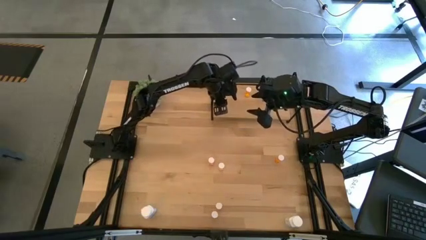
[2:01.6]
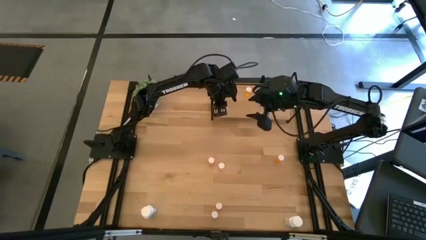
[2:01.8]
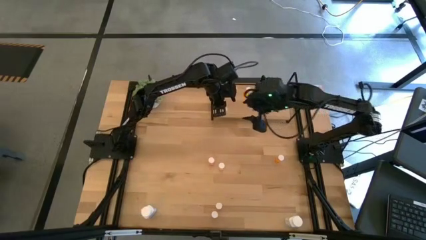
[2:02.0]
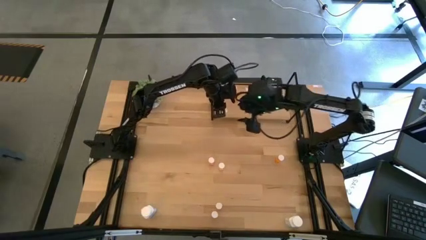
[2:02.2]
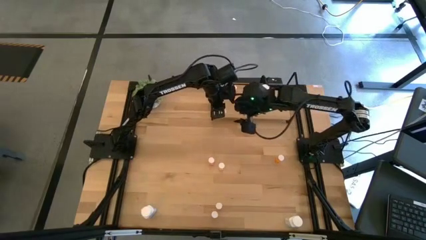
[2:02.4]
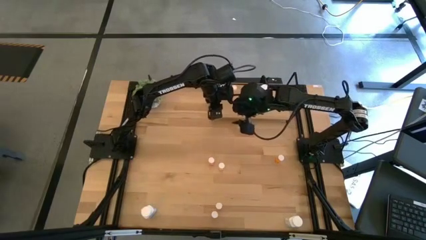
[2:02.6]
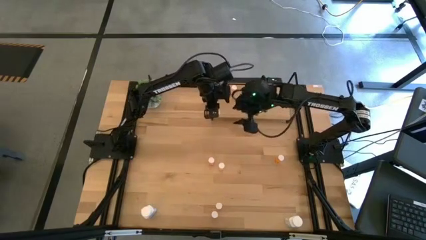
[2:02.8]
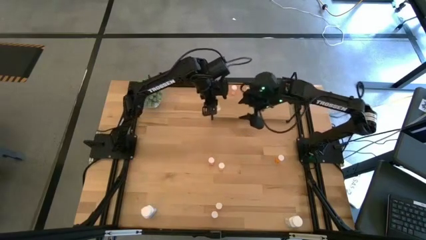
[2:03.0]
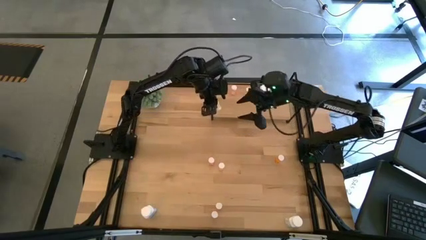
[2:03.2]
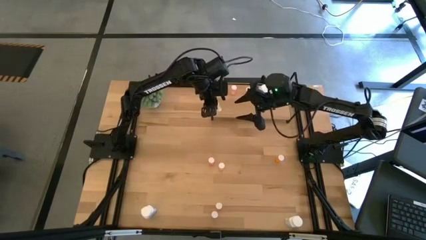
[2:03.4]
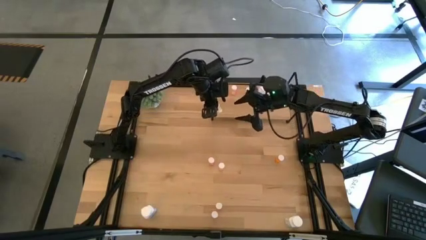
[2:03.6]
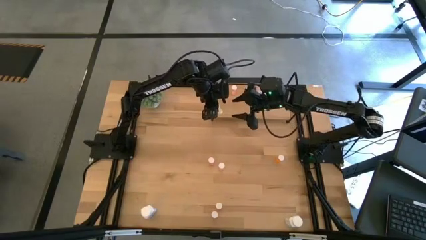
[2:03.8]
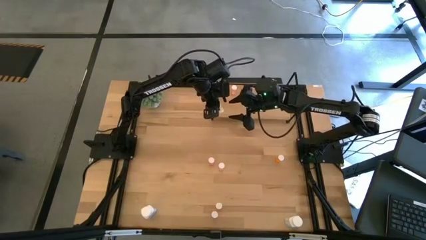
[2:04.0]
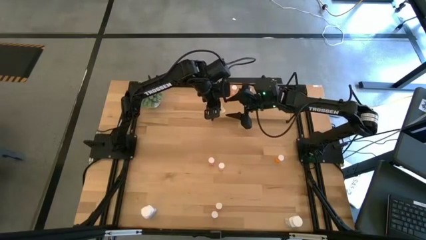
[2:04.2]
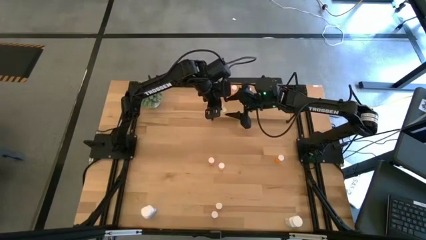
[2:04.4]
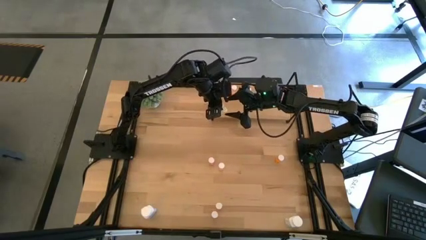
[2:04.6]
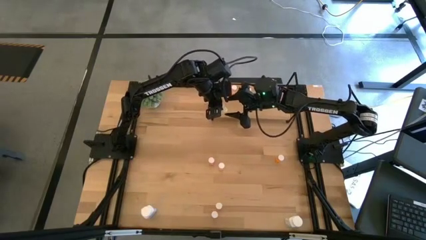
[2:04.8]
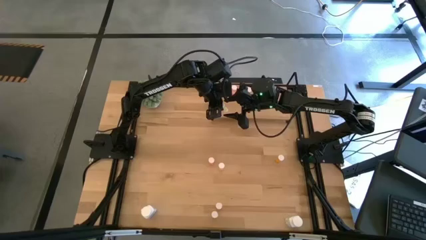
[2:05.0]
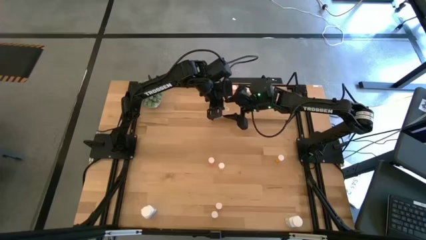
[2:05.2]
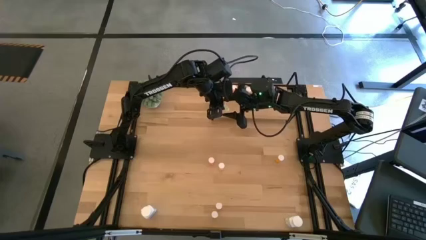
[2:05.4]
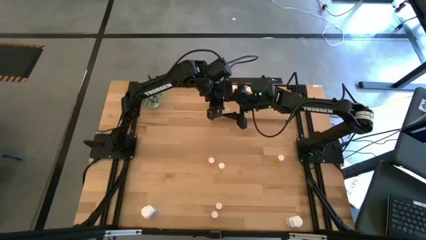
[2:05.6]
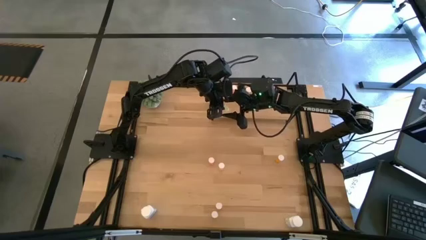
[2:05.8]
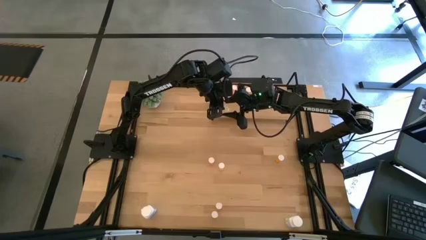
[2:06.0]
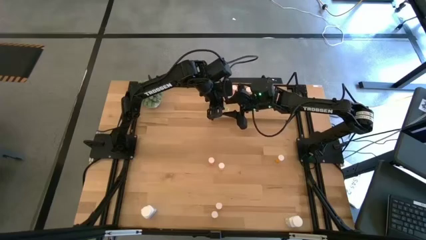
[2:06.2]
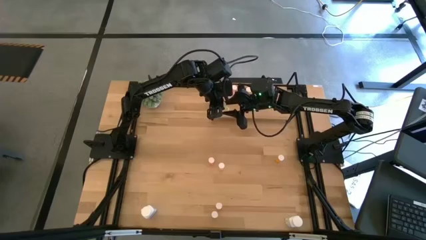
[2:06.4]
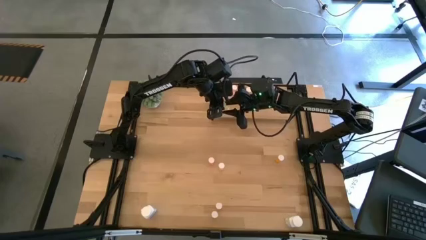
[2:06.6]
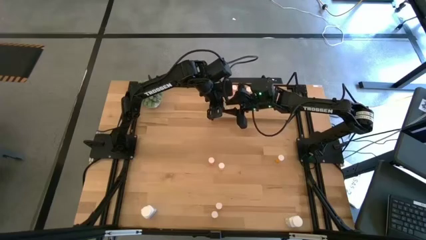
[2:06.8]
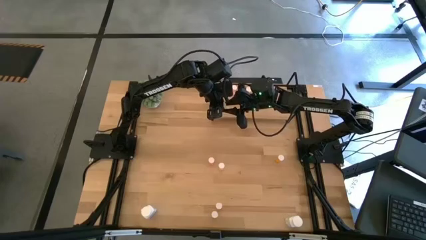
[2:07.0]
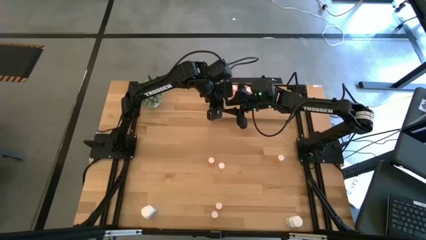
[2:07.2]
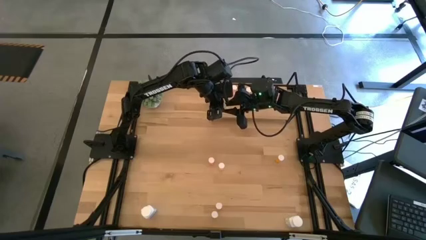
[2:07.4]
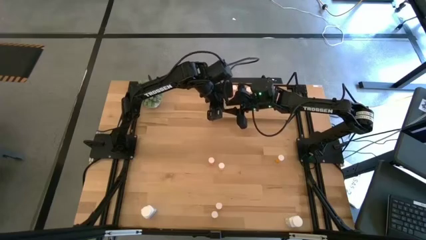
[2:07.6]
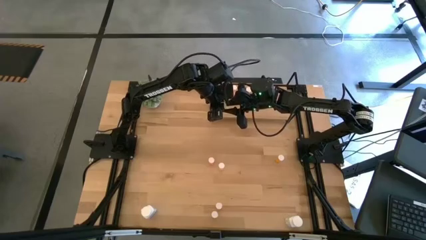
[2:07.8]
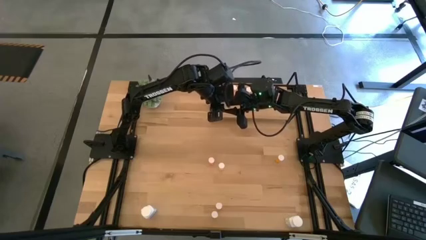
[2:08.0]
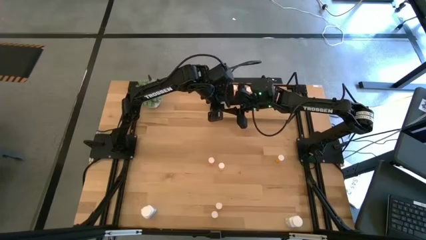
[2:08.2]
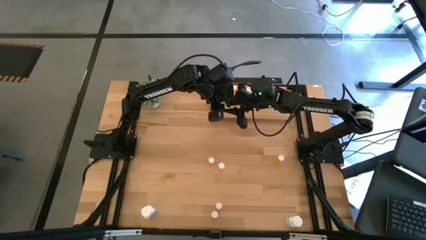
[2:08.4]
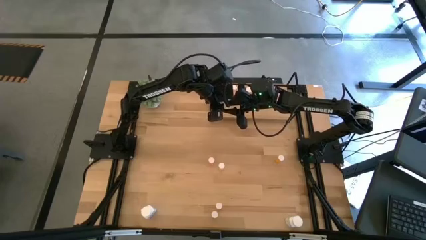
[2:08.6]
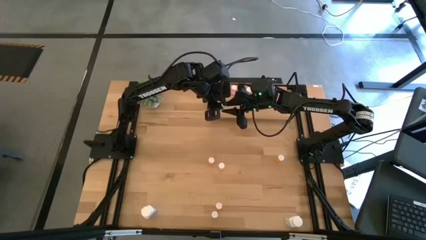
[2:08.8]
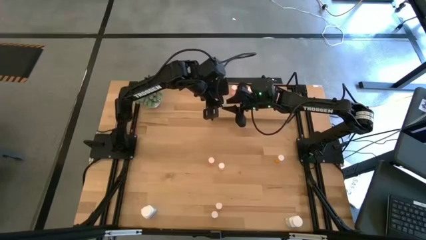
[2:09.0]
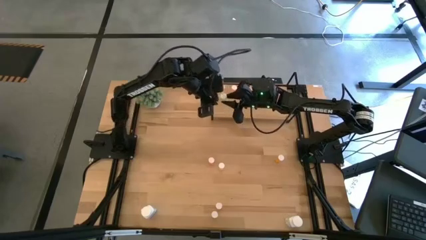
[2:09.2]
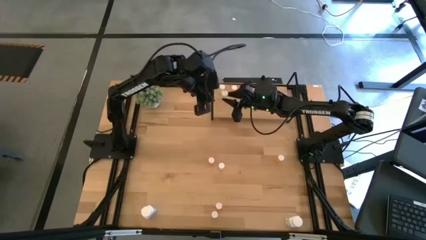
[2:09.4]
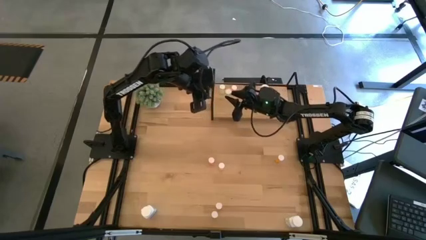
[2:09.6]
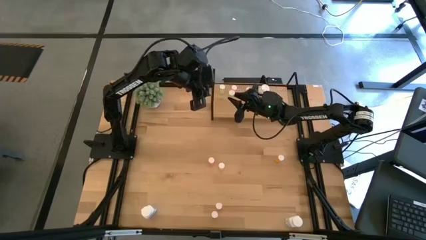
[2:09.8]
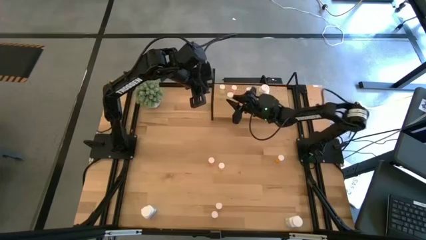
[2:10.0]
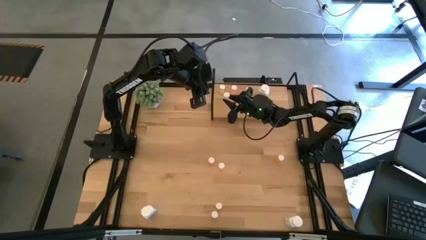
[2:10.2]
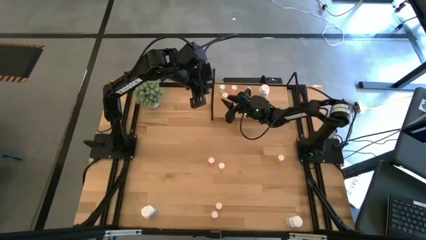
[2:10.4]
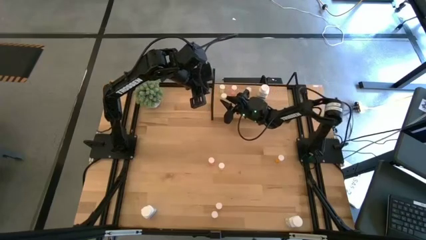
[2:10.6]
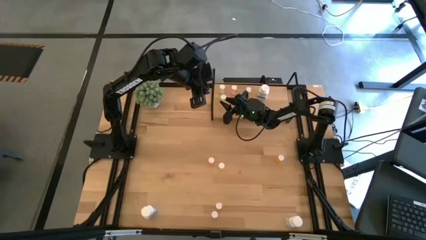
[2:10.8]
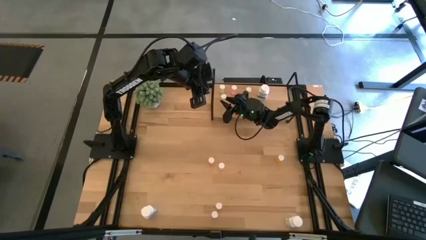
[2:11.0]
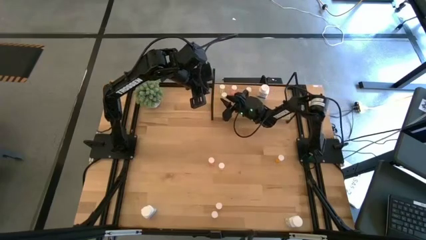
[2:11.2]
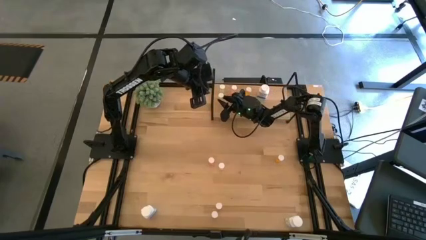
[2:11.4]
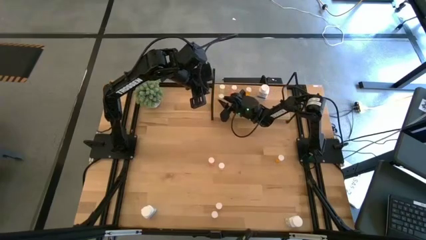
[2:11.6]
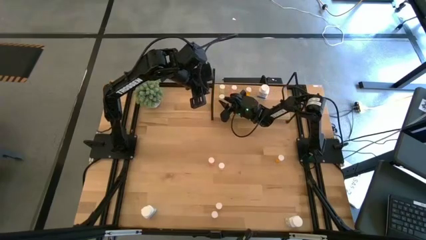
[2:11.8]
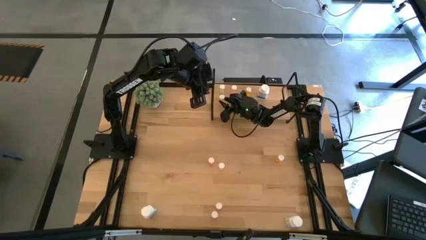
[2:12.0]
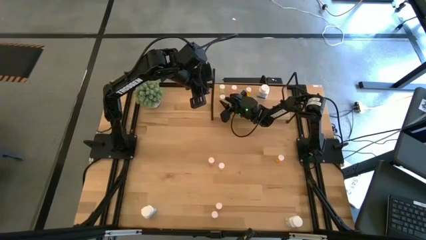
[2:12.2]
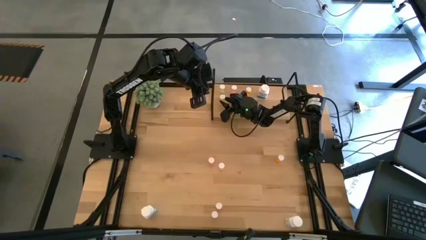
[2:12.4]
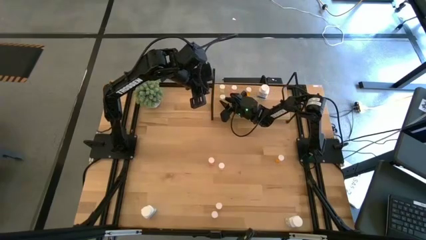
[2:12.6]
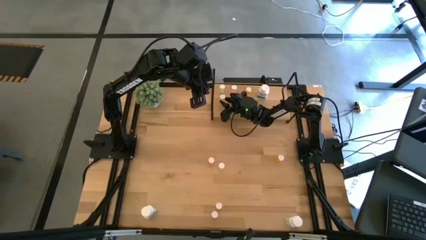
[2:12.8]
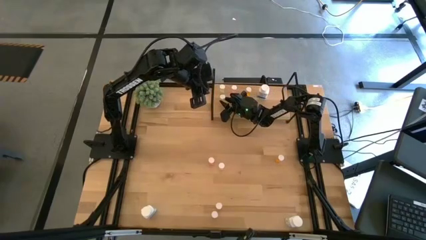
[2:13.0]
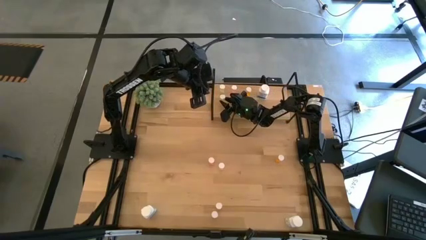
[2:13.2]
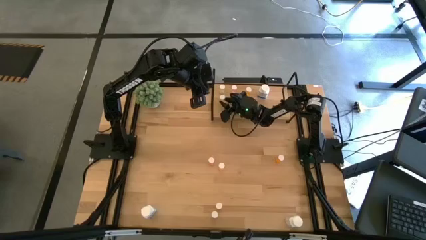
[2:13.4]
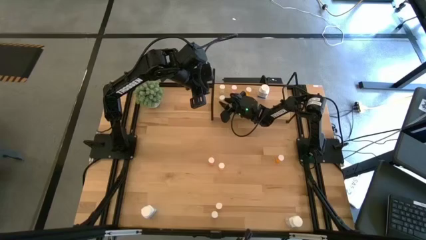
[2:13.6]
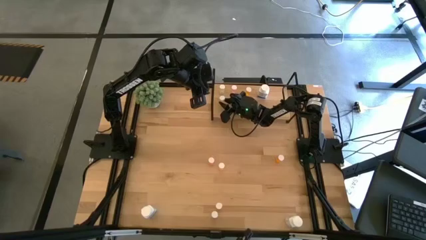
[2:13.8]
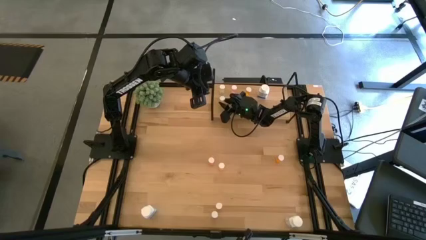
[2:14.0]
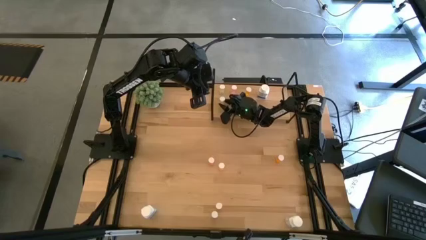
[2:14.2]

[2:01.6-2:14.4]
Task: Pick and place medicine bottles onto shelf by color
Put the left yellow pill bottle on the shelf aligned with the other yellow pill bottle

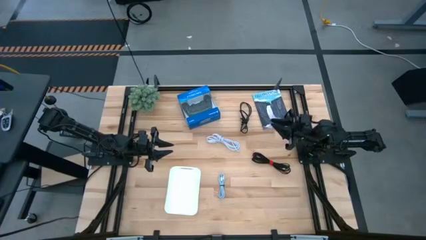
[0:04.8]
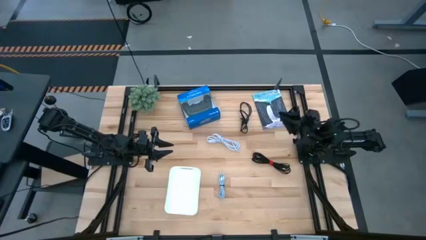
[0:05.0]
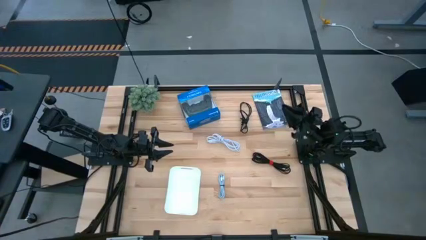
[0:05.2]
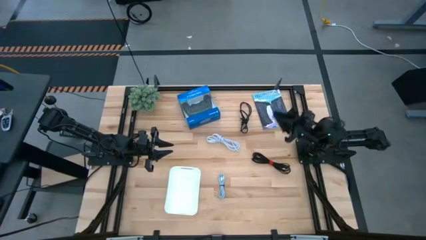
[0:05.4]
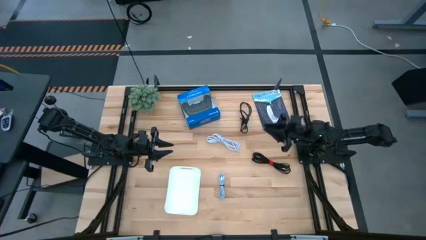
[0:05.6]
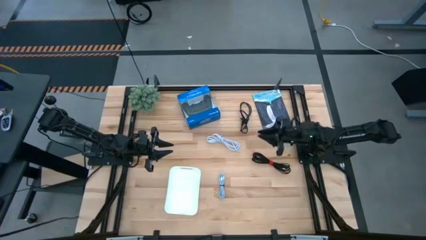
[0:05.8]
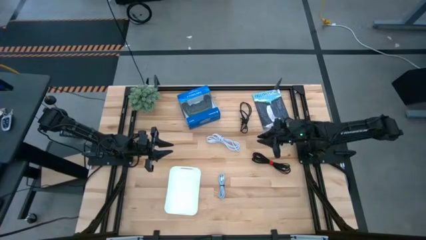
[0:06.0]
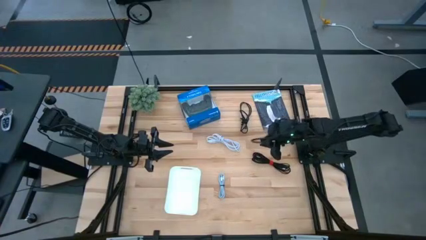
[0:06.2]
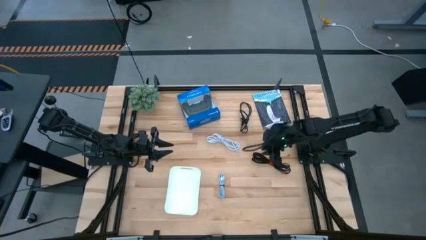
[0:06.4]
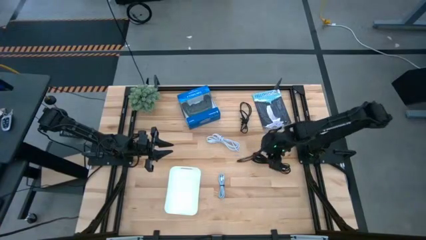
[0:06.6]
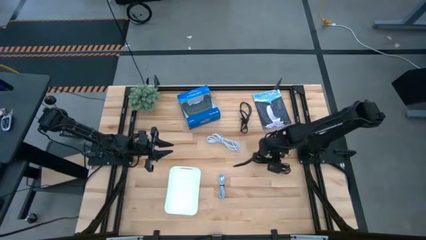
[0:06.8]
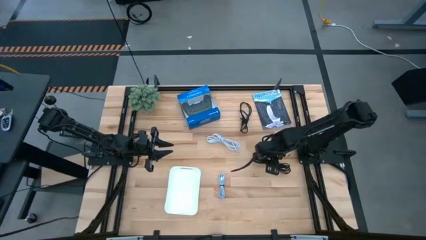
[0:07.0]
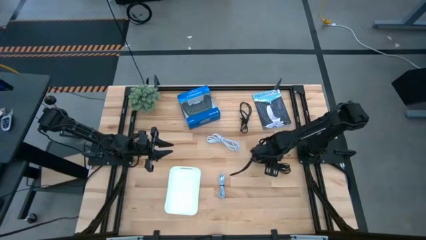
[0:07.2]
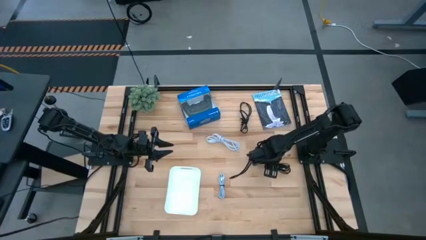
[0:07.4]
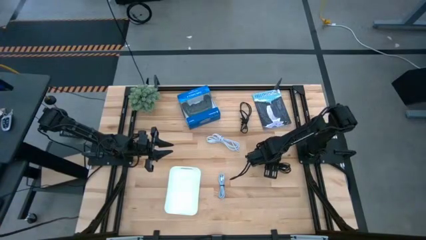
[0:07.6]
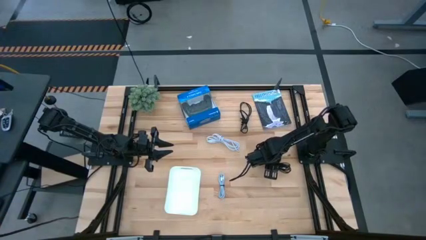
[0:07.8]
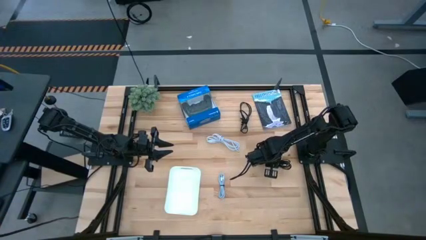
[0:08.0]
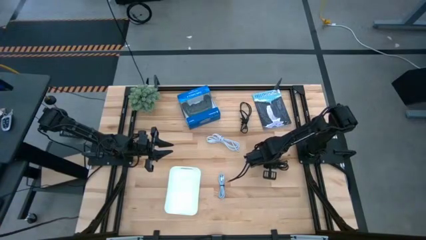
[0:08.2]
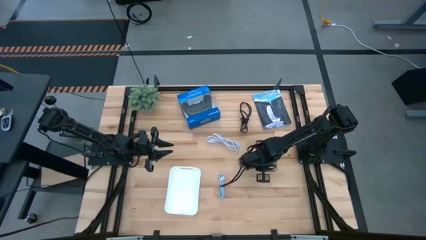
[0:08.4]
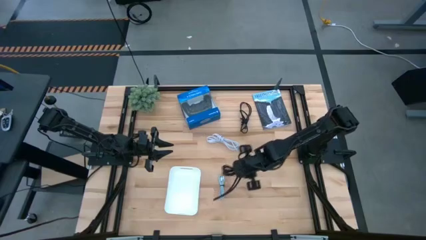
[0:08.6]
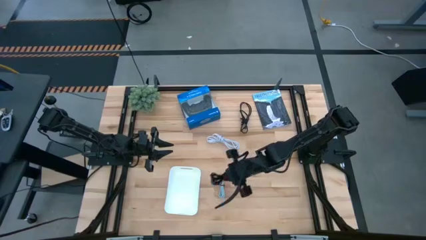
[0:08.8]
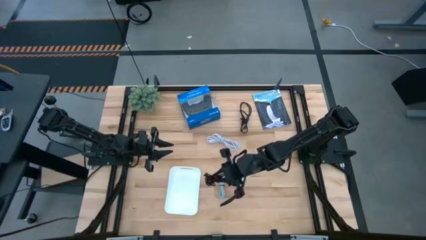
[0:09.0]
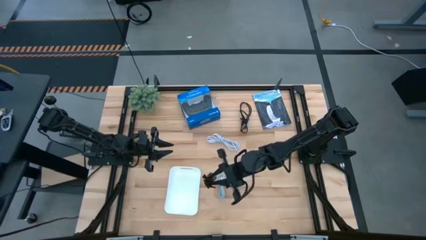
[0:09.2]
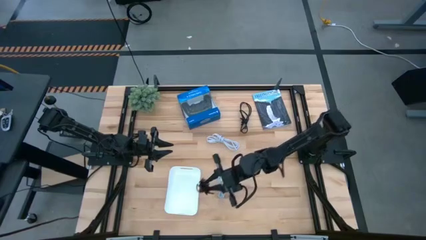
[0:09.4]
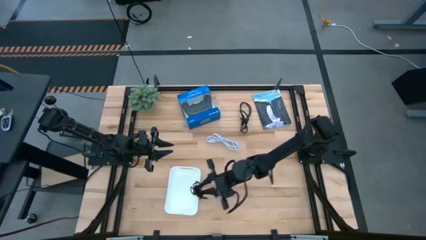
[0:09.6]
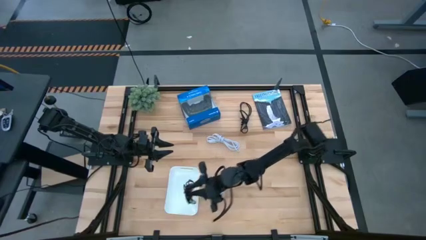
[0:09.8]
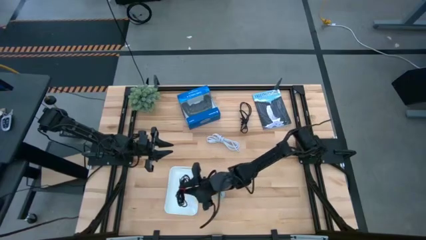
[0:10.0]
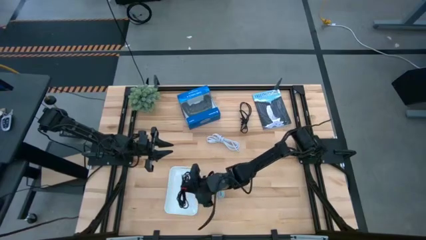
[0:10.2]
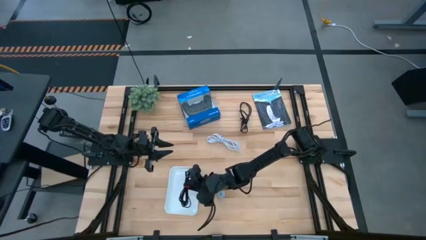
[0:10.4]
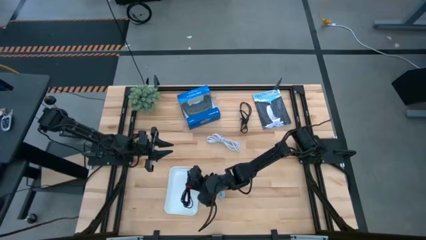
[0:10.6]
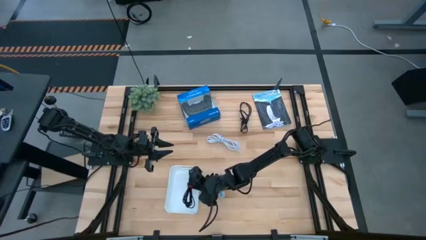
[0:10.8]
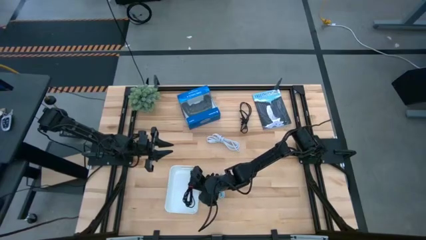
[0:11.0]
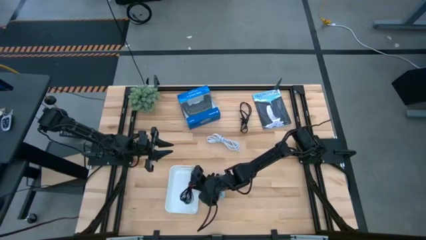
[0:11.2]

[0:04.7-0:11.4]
Task: Pick and place USB-C Cables
Put the bottom black charger cable into the white bin
